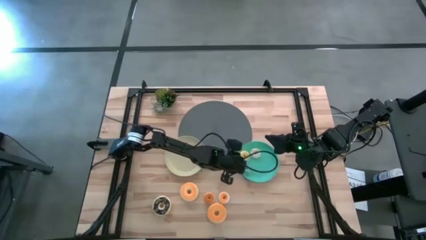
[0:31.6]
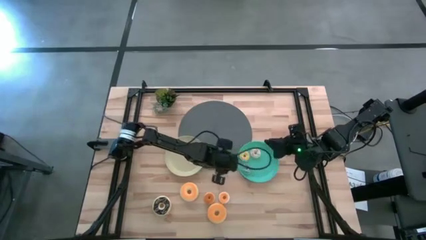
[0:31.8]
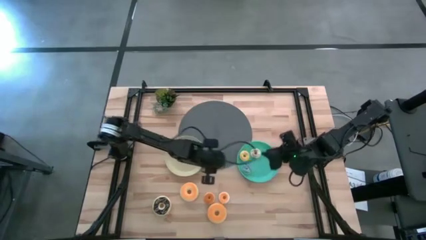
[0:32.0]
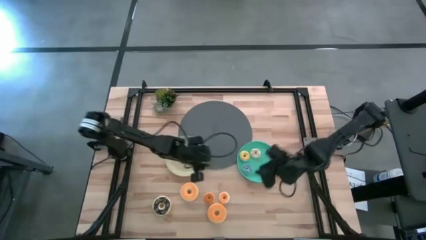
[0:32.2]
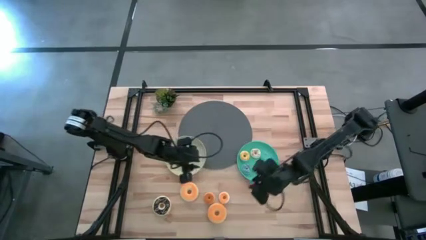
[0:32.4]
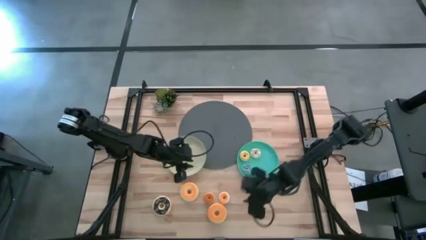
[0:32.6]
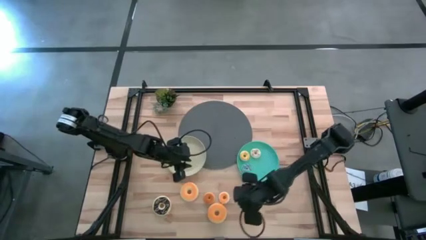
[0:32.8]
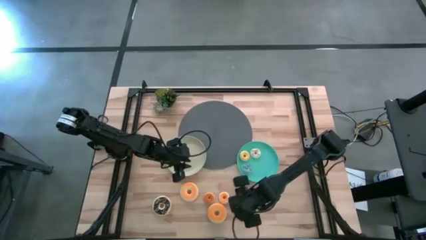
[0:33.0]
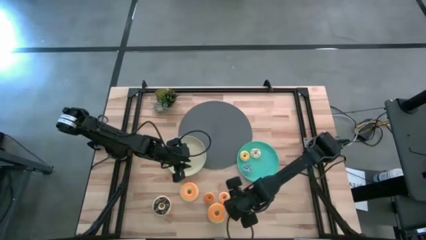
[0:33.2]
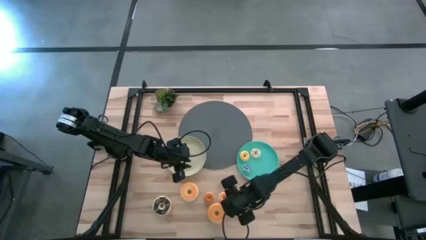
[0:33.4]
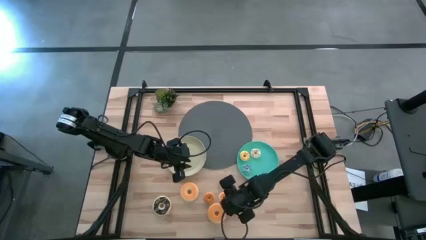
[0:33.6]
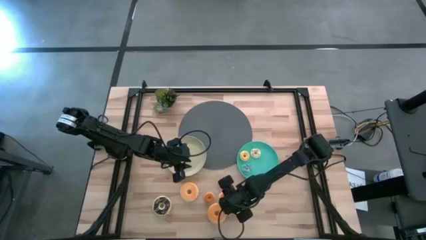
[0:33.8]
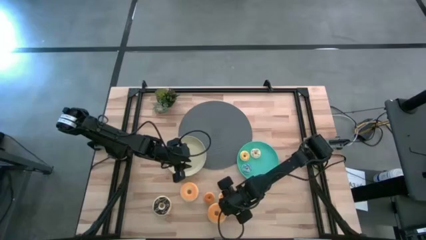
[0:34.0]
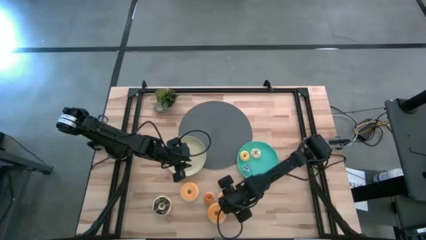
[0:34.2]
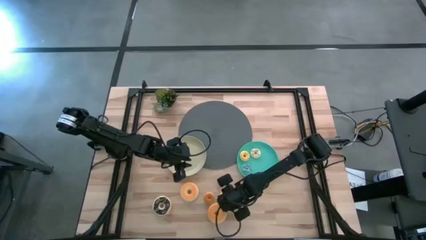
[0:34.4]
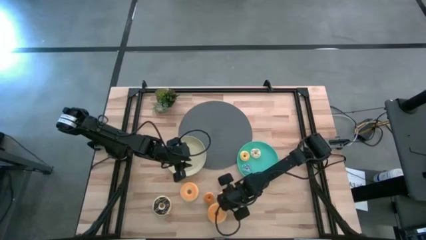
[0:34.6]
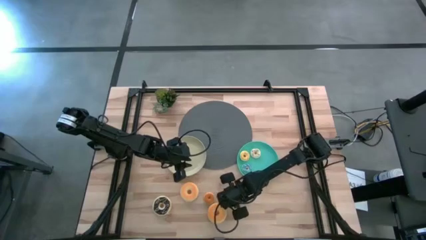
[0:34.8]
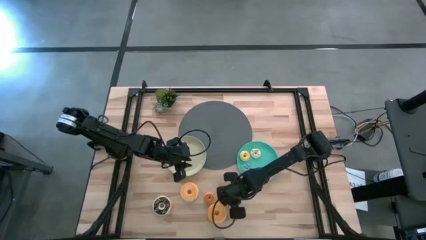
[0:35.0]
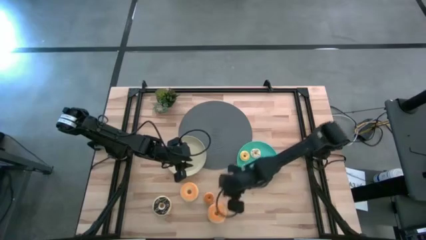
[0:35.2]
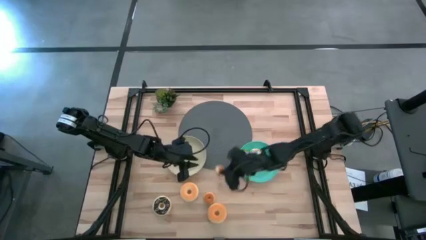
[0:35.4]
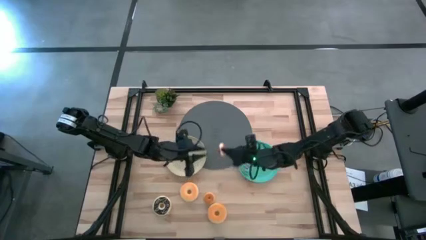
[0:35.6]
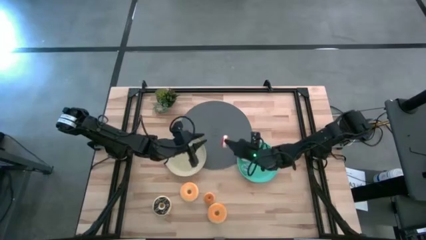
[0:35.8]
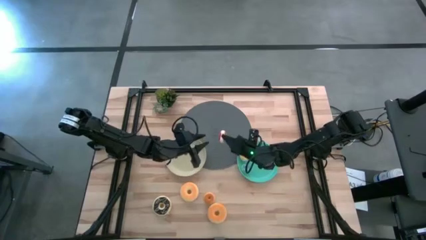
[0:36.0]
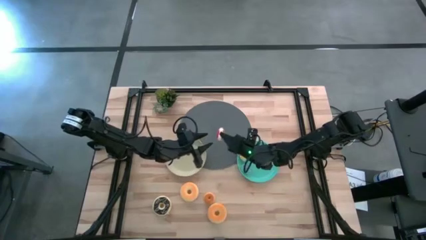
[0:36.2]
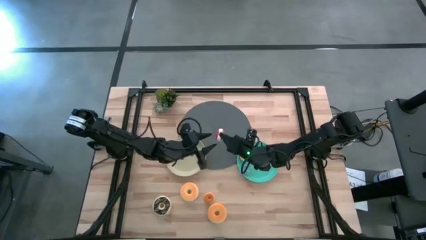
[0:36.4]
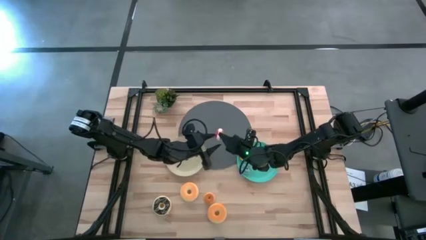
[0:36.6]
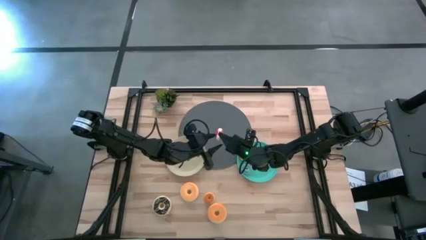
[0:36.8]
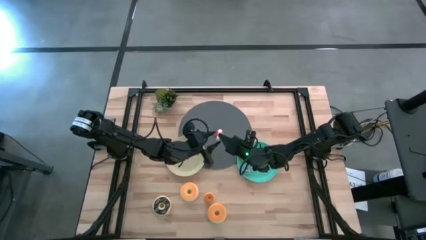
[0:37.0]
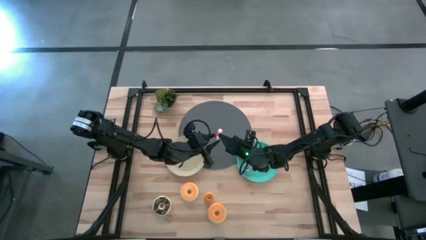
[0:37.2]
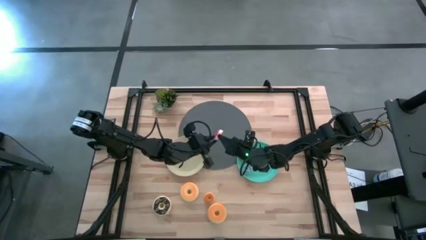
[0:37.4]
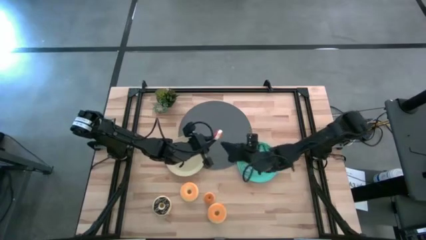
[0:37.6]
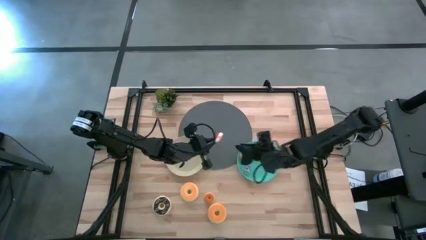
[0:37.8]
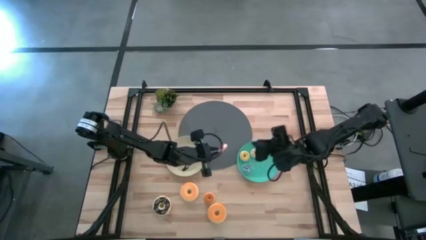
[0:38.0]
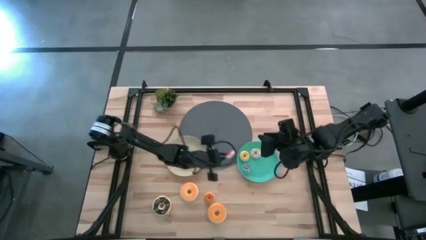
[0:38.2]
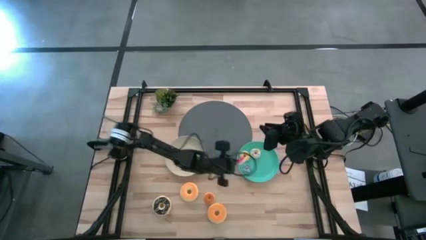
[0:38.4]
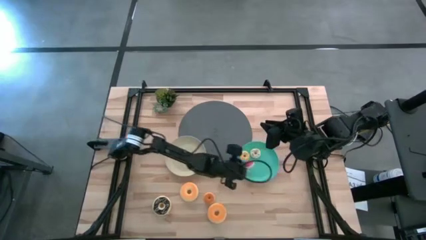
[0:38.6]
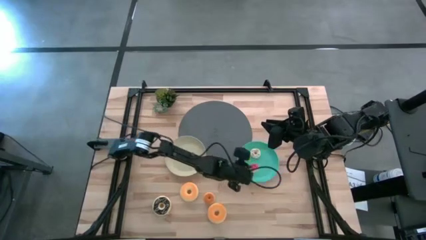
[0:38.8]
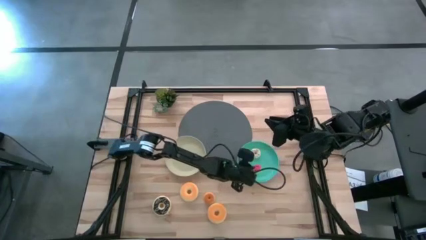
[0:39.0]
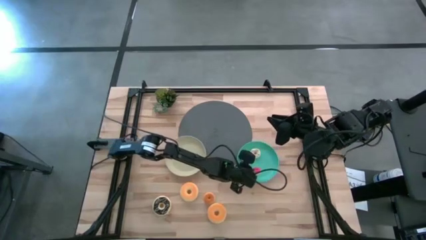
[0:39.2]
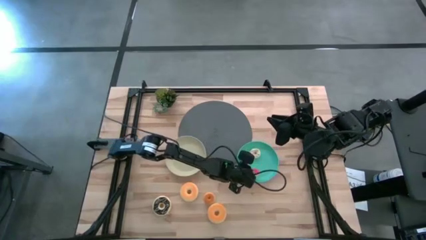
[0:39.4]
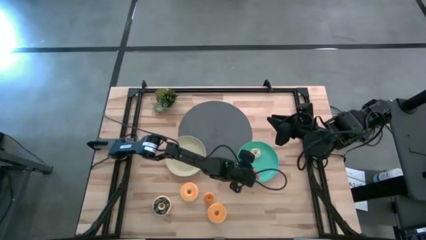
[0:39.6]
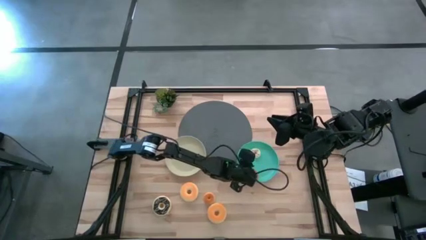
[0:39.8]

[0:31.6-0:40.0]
Task: Pick & Place donuts
Put the small red donut on the green plate
